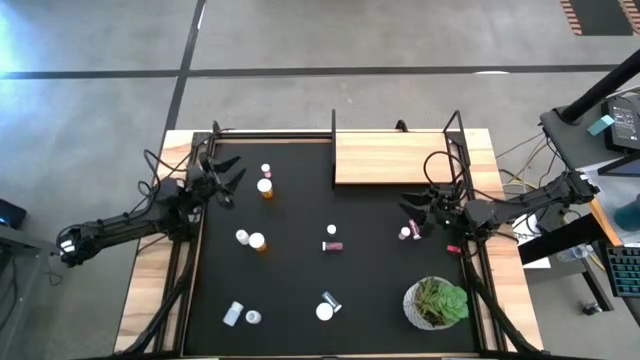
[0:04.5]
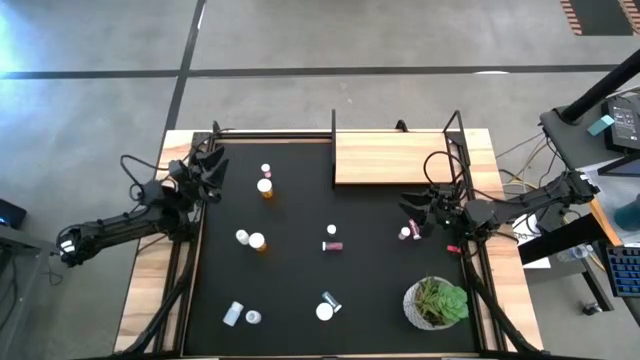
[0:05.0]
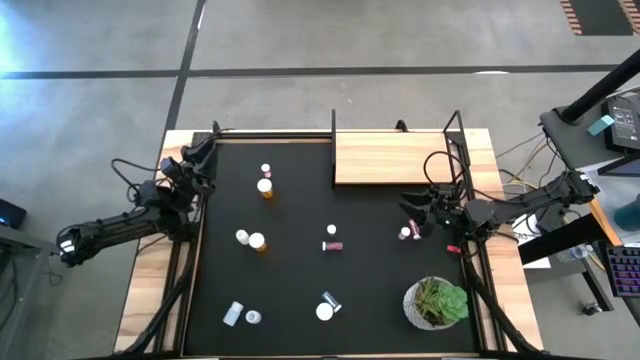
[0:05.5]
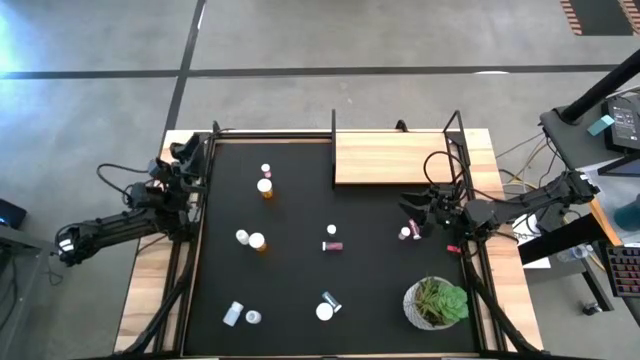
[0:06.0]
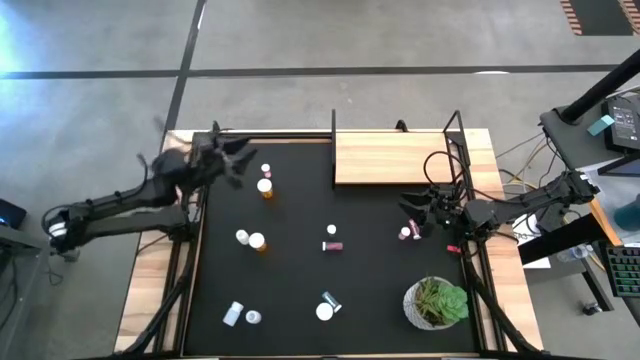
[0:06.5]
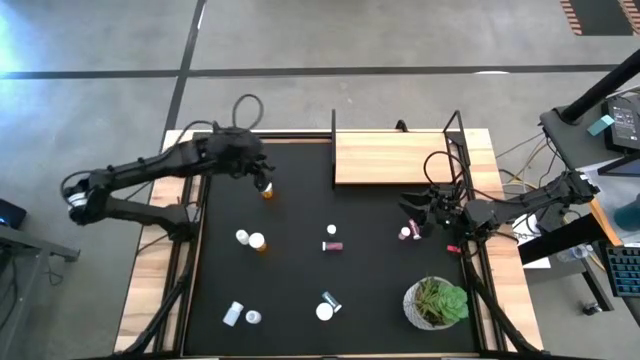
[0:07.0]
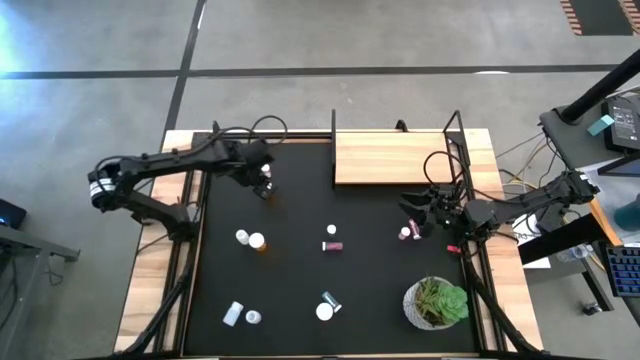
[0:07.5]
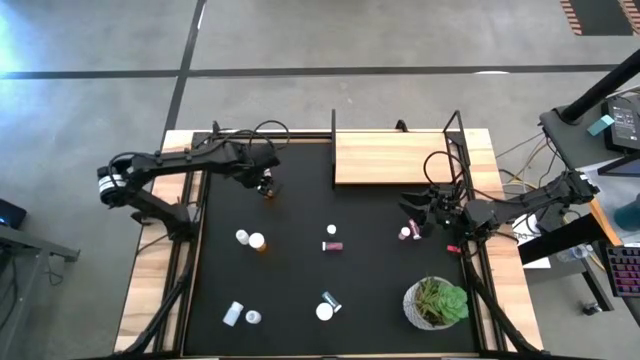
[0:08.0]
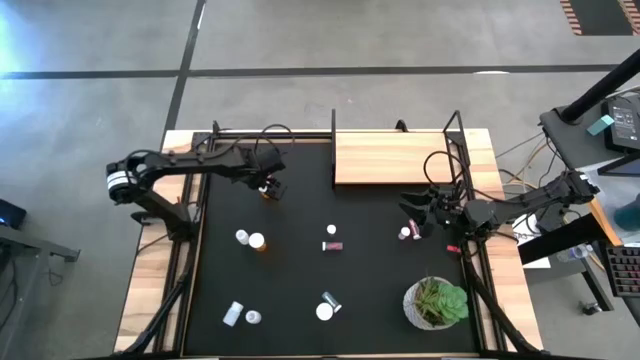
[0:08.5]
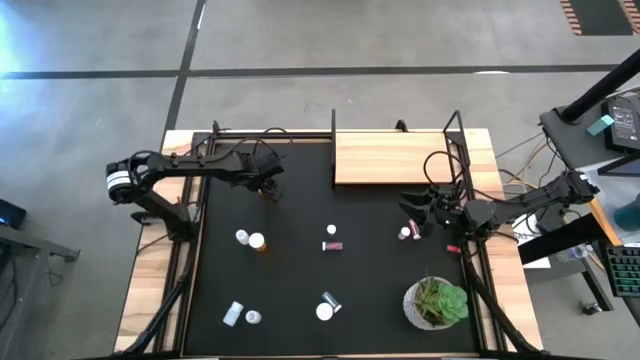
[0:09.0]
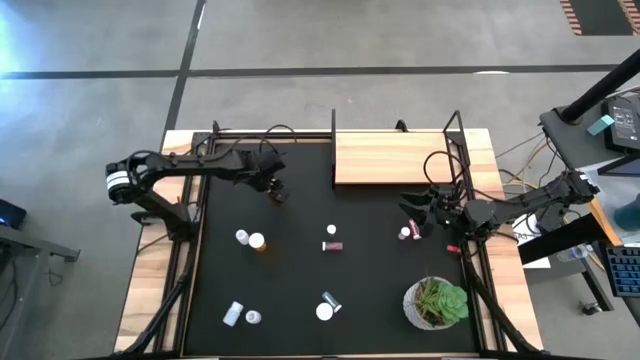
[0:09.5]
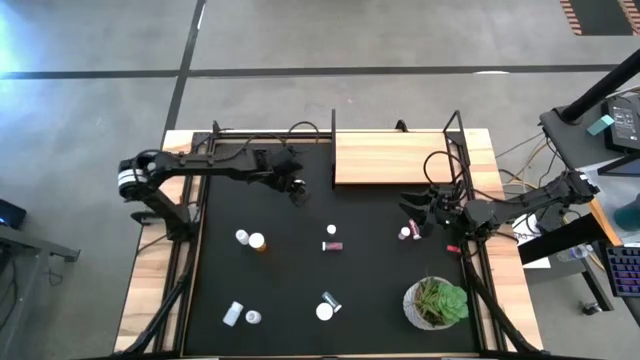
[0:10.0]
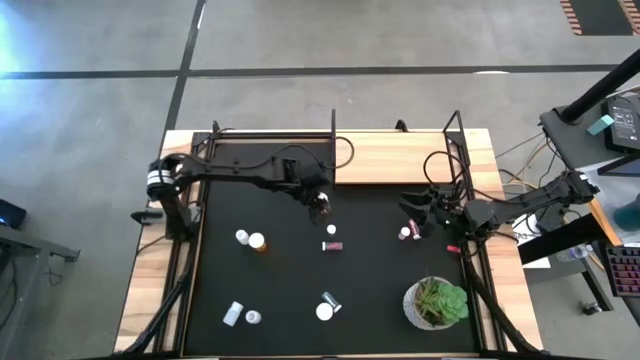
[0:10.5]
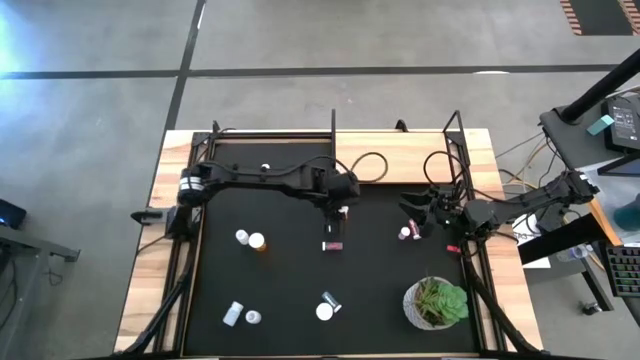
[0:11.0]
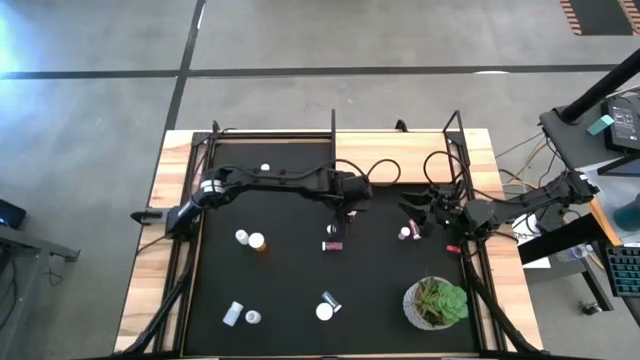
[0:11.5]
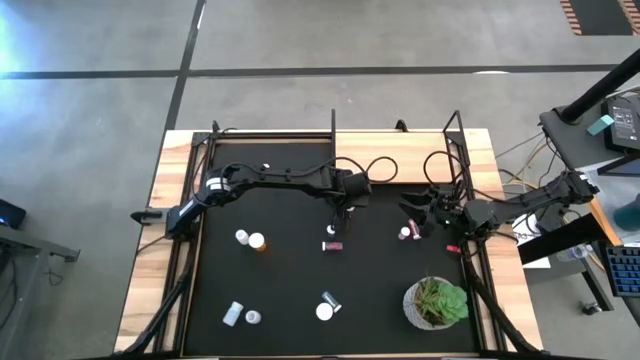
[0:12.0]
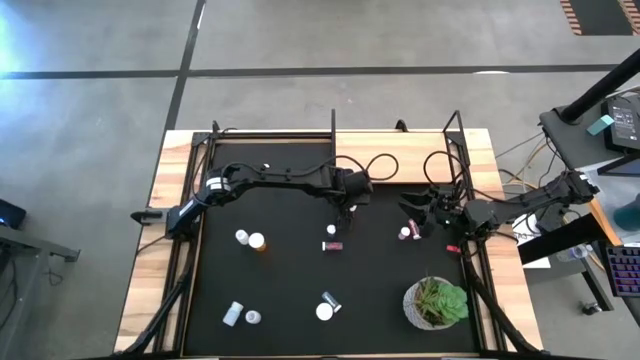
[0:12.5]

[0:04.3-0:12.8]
Task: Pick and place medicine bottles onto shelf by color
Move the top orange pill bottle to the center of the table

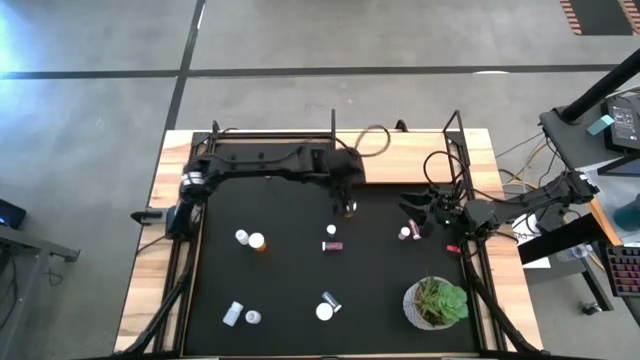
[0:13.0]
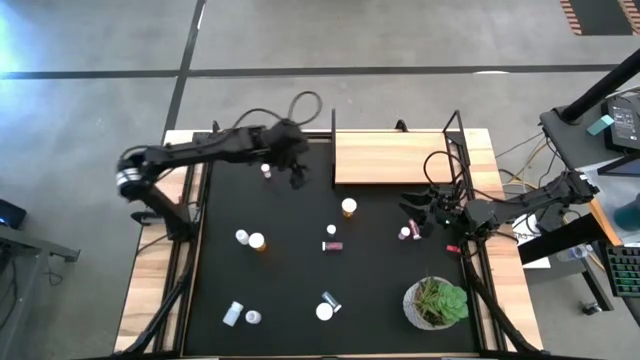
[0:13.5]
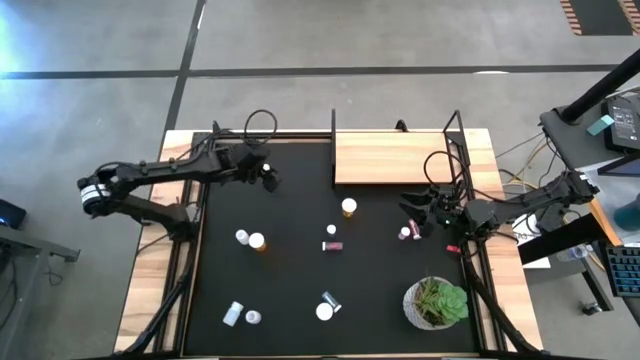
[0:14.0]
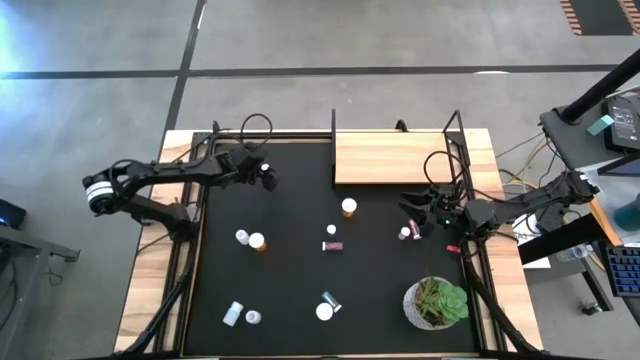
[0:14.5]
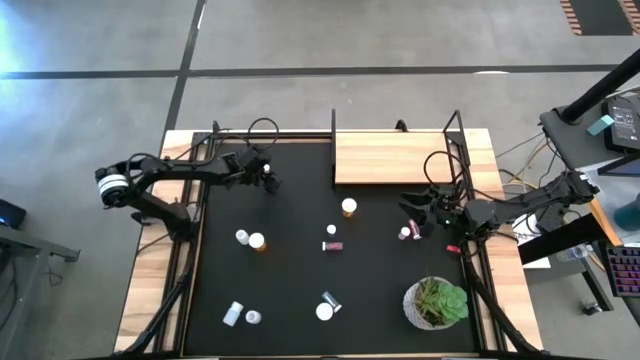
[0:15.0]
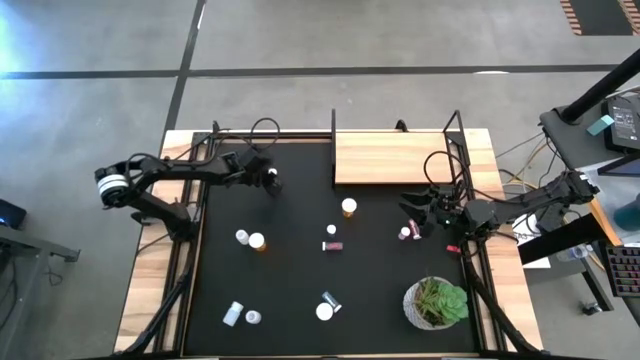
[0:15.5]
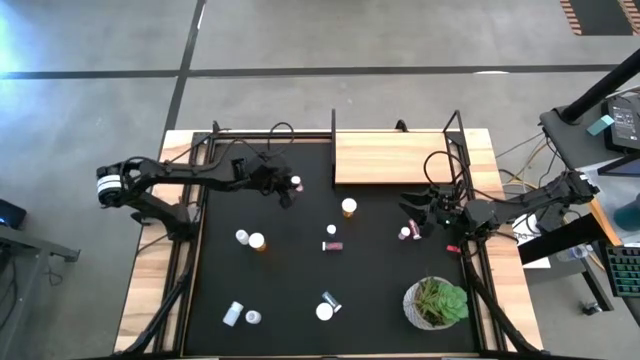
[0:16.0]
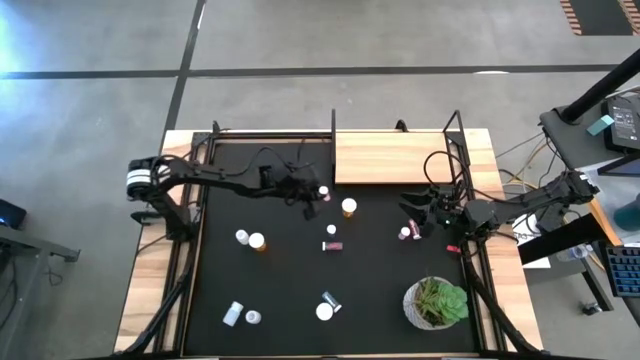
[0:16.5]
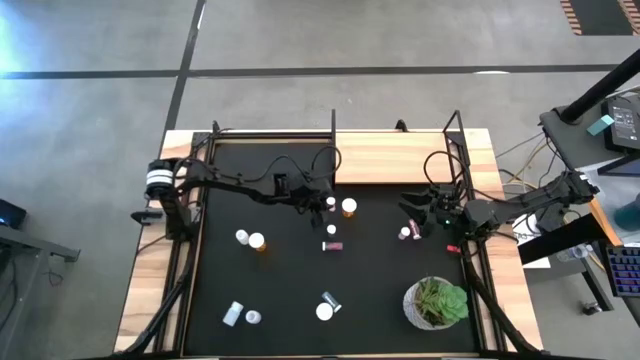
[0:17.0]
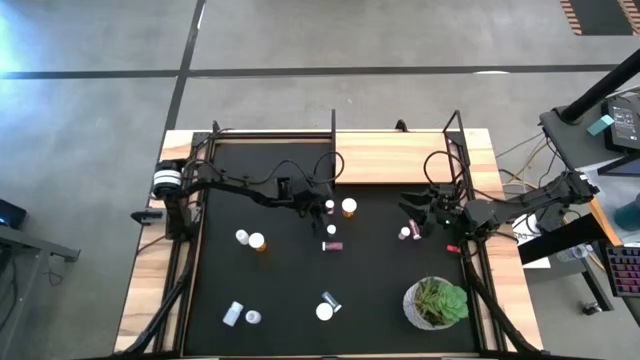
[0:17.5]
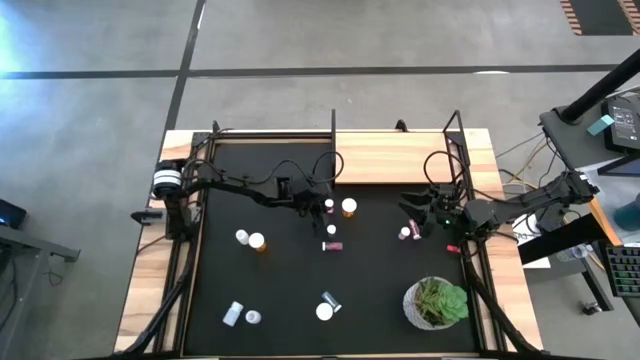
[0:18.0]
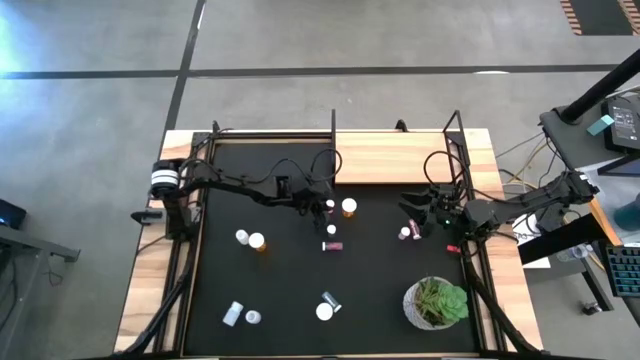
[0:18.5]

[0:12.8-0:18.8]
Move the top pink pill bottle to the center of the table

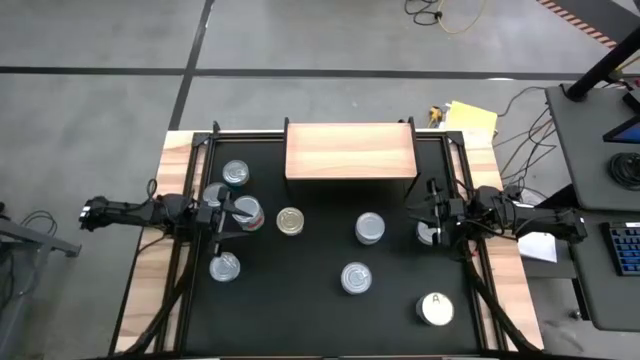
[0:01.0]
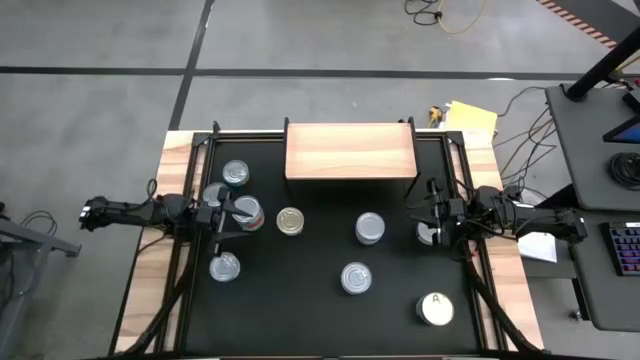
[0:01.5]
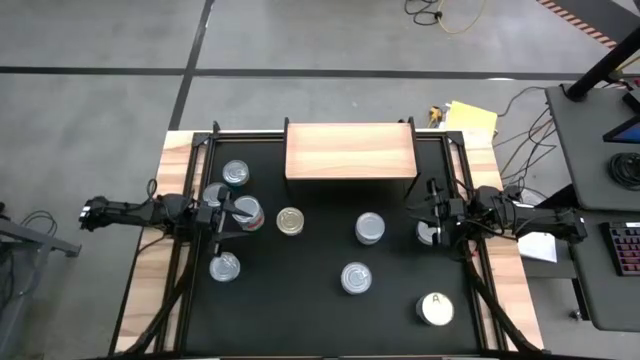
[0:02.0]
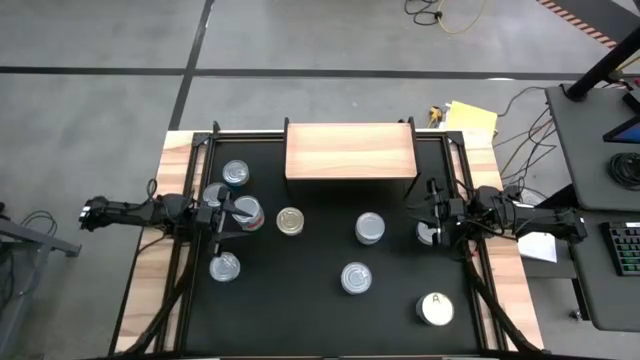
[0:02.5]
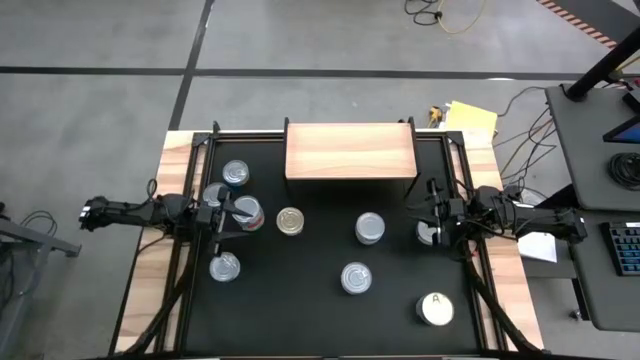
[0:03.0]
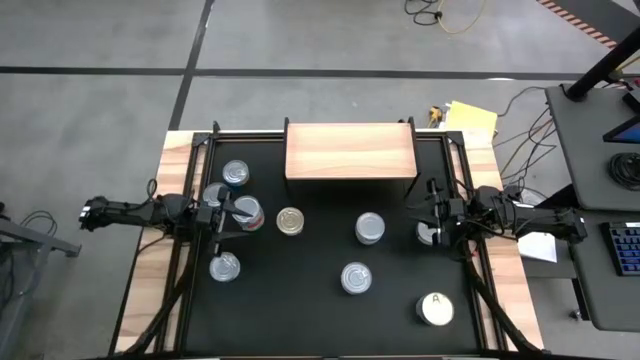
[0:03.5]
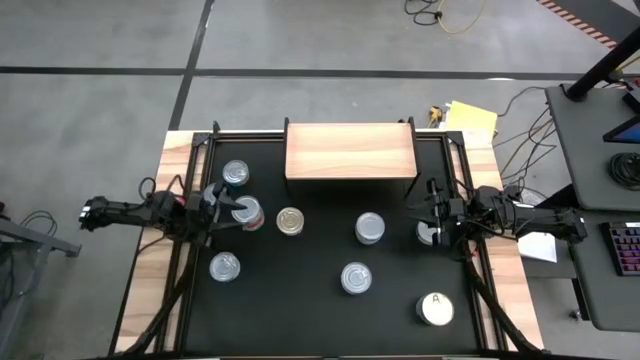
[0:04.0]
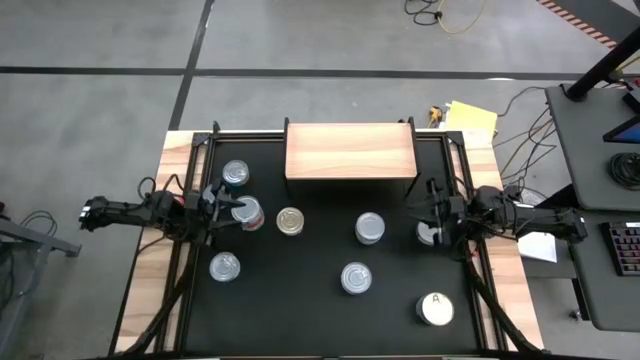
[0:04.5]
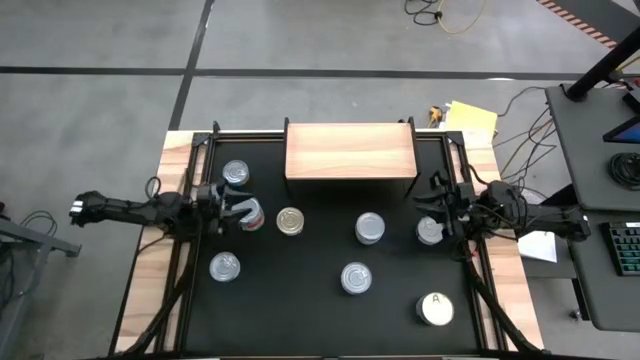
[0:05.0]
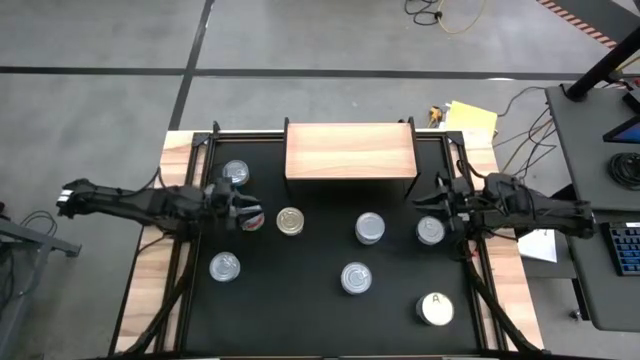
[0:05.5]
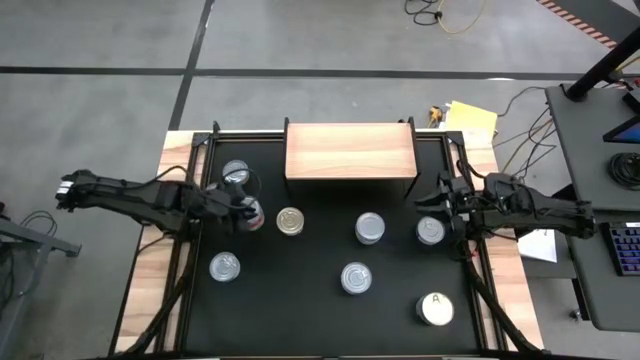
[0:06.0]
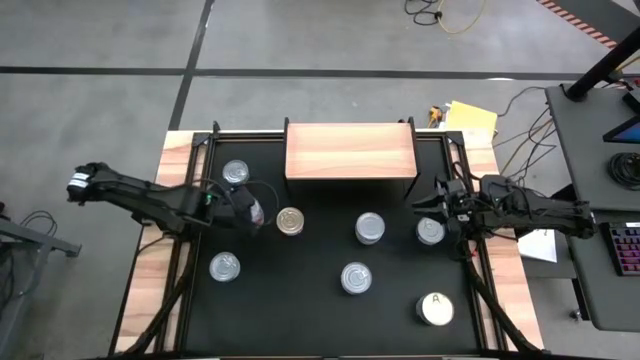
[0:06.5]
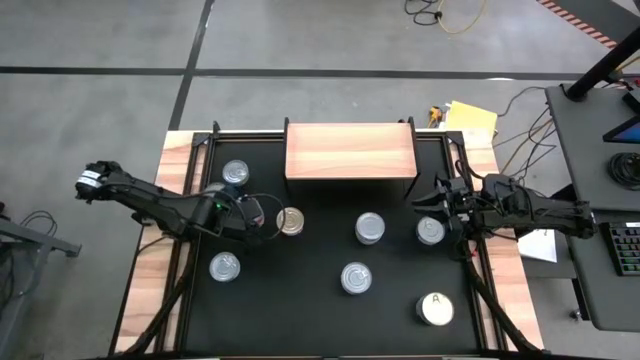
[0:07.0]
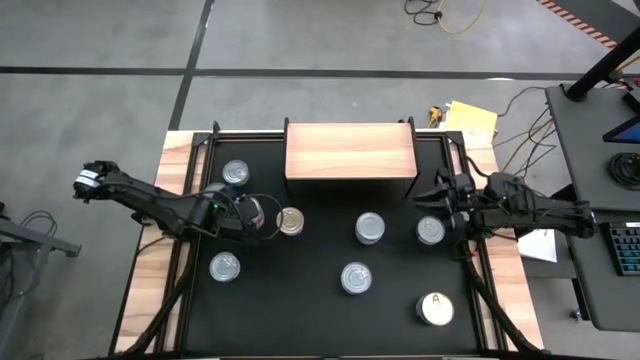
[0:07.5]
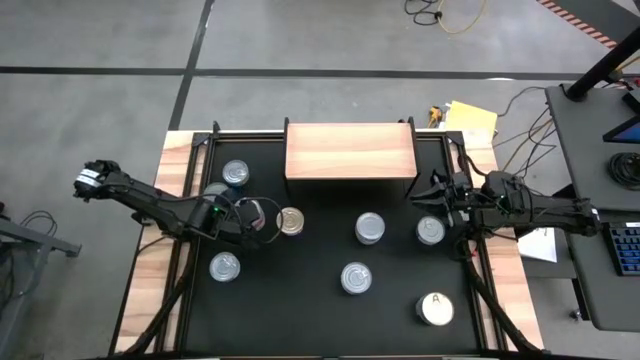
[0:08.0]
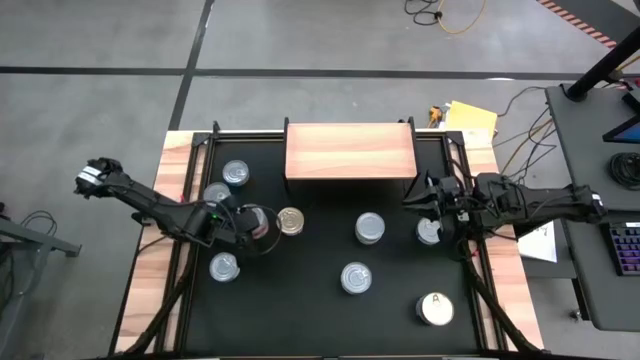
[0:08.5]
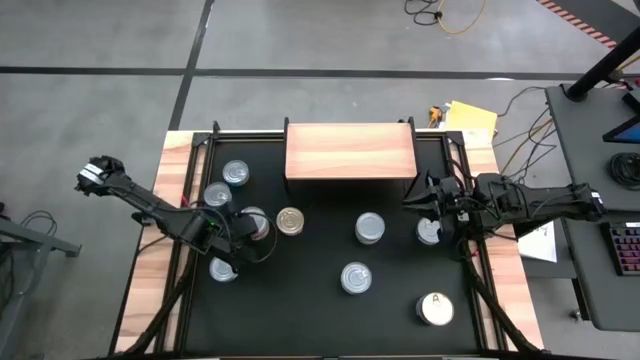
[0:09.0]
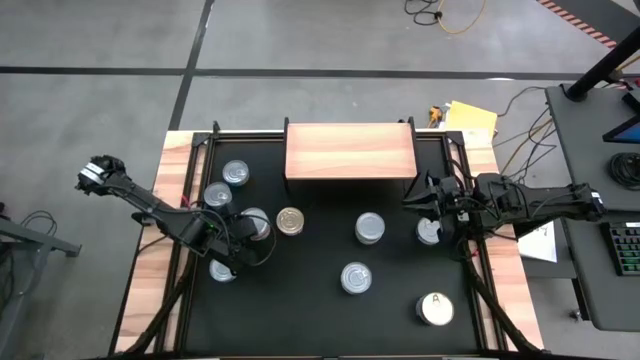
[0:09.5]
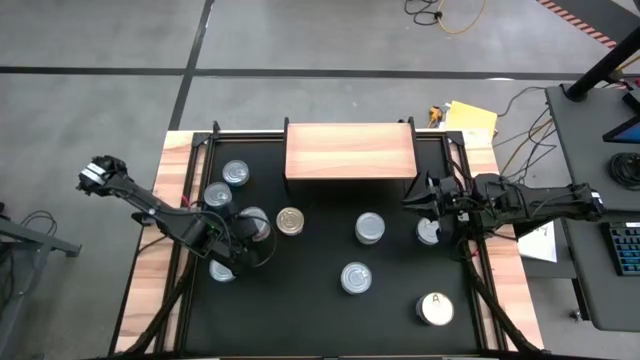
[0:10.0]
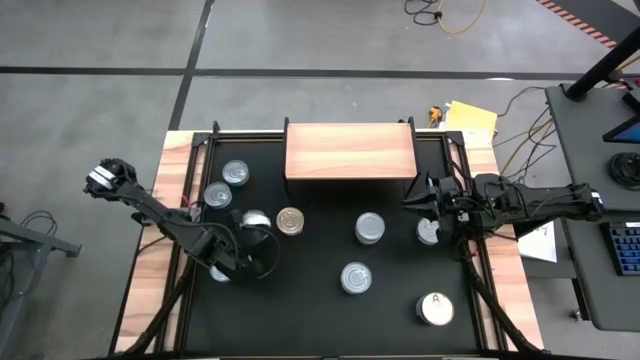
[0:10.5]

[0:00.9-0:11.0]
Task: Stack canned seafood by type on shelf
Put the green white tuna can on the shelf
